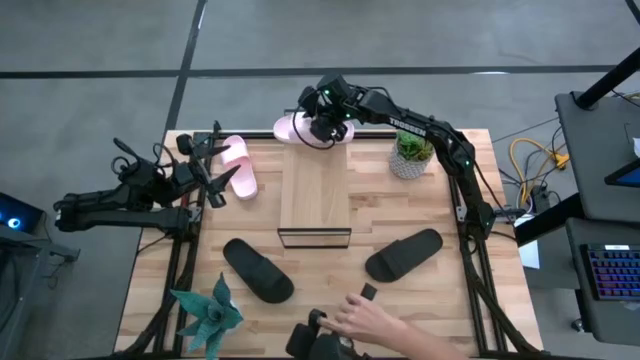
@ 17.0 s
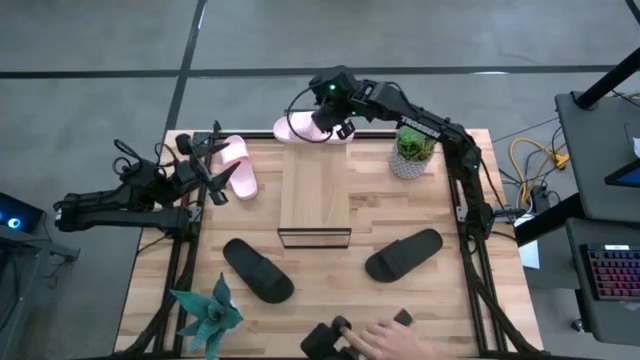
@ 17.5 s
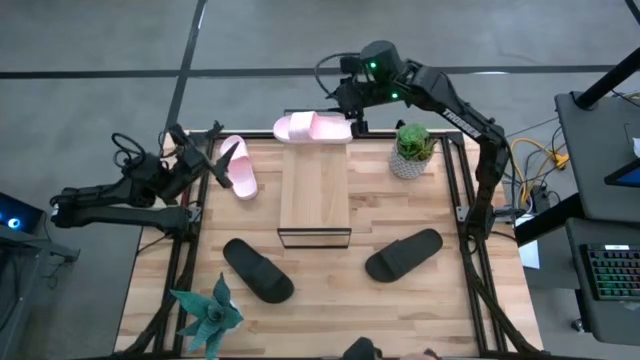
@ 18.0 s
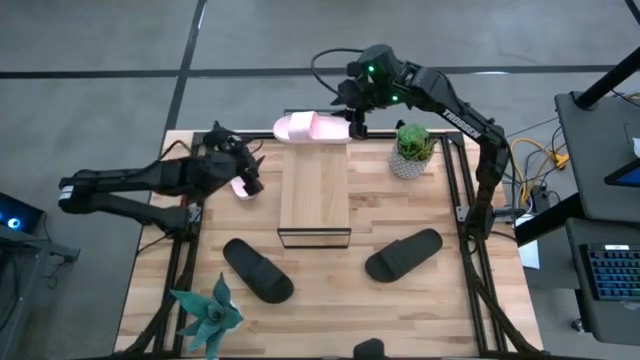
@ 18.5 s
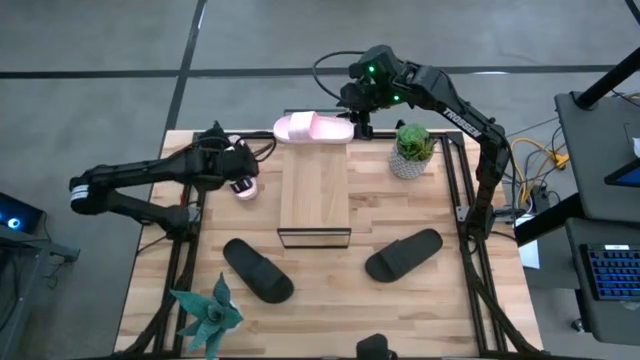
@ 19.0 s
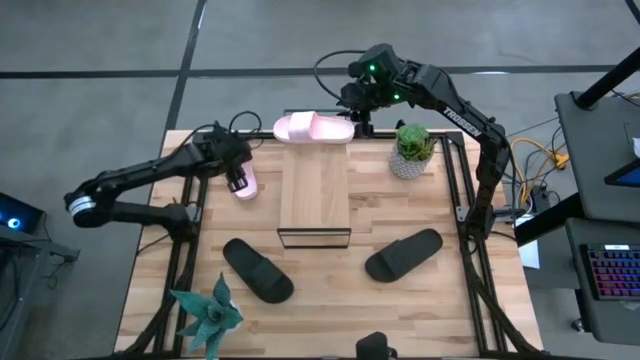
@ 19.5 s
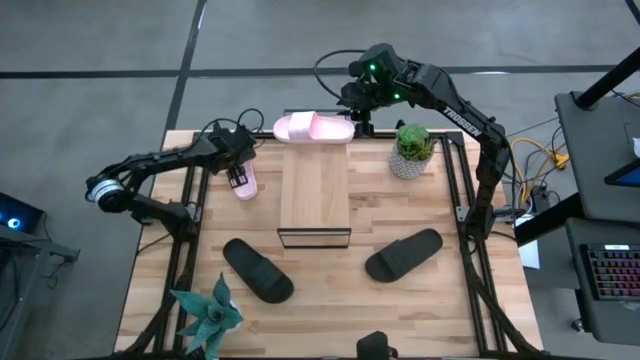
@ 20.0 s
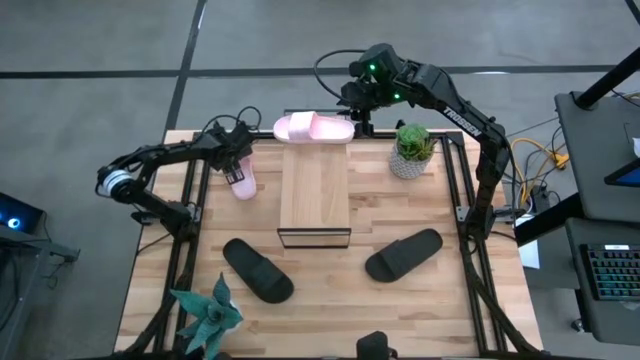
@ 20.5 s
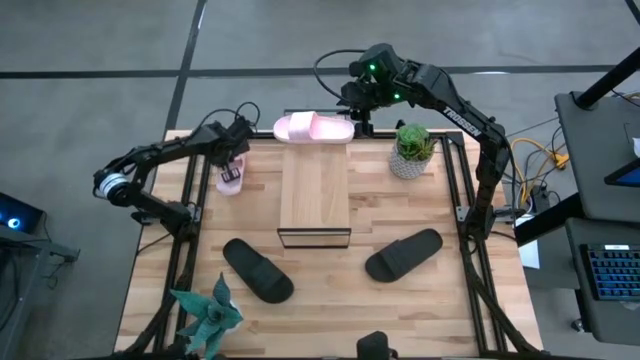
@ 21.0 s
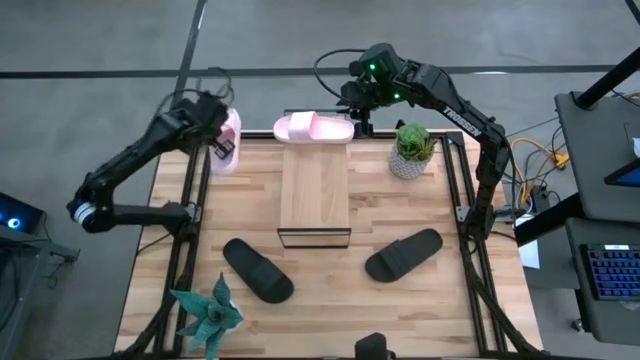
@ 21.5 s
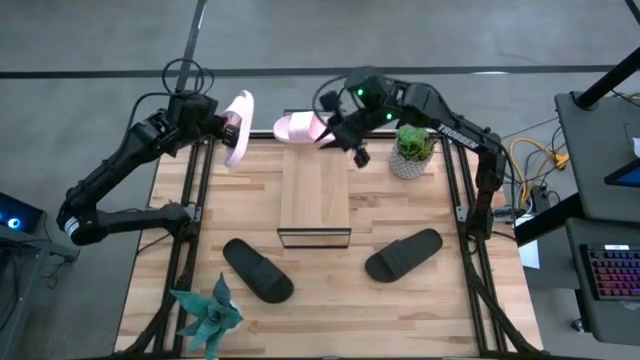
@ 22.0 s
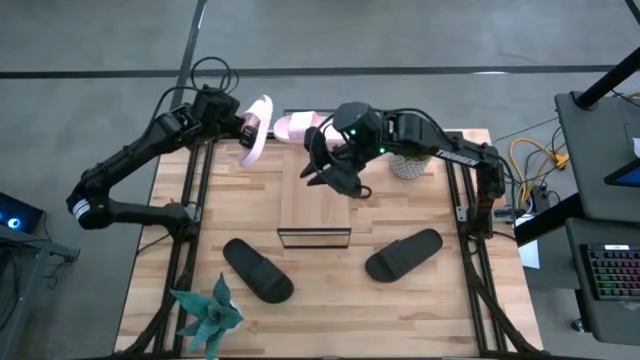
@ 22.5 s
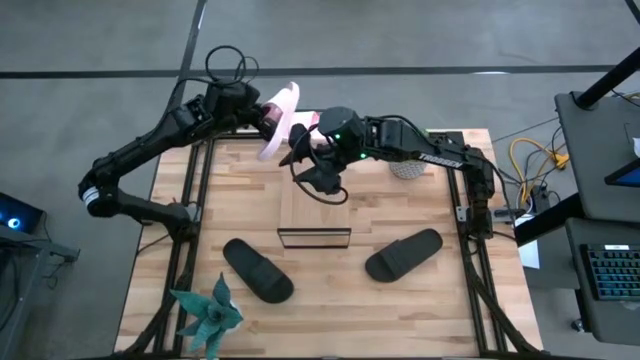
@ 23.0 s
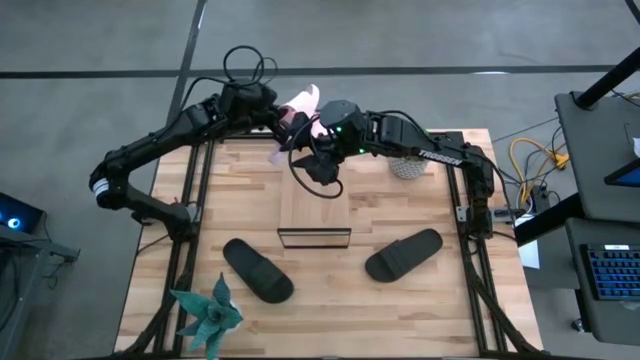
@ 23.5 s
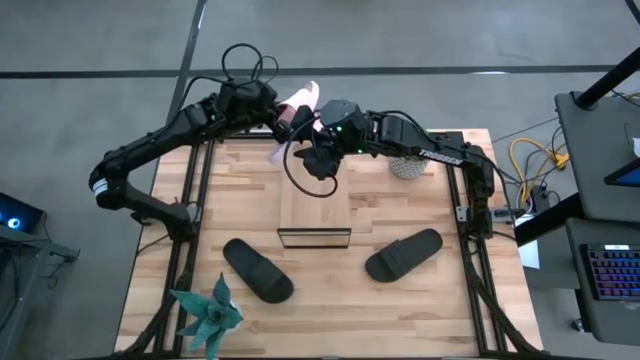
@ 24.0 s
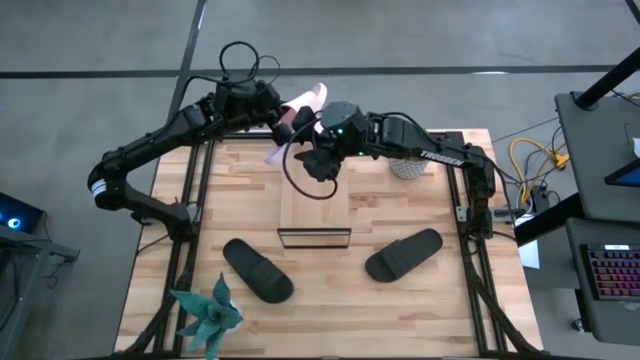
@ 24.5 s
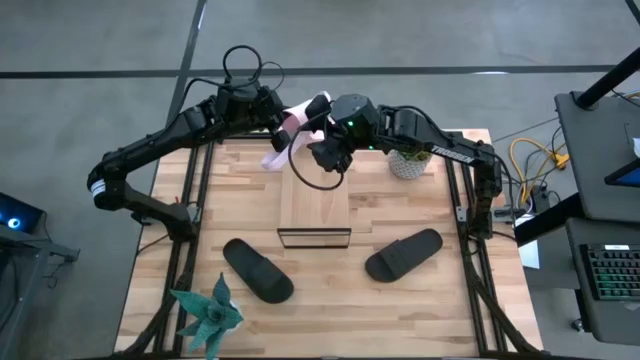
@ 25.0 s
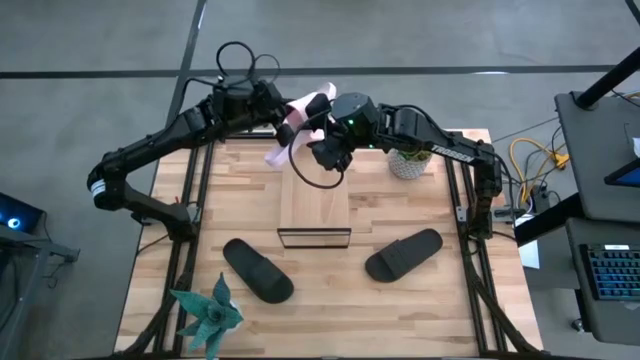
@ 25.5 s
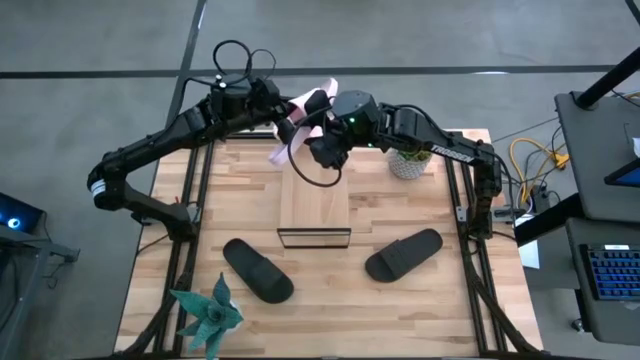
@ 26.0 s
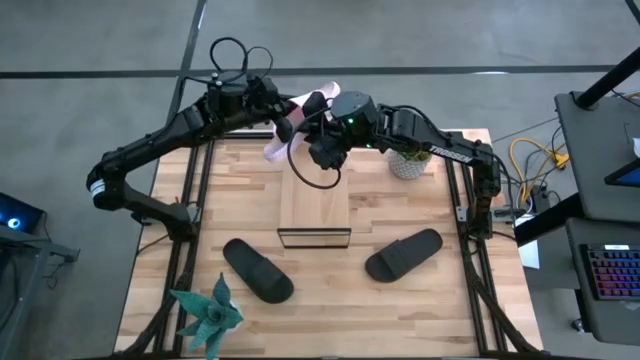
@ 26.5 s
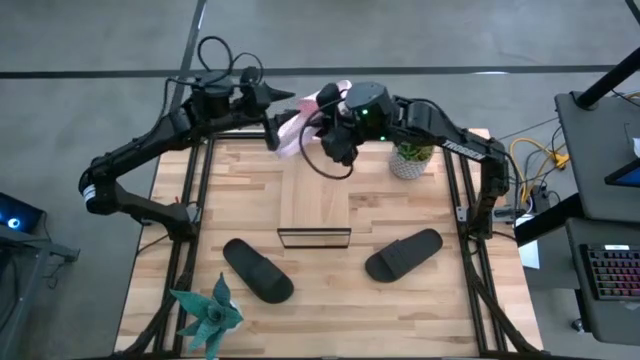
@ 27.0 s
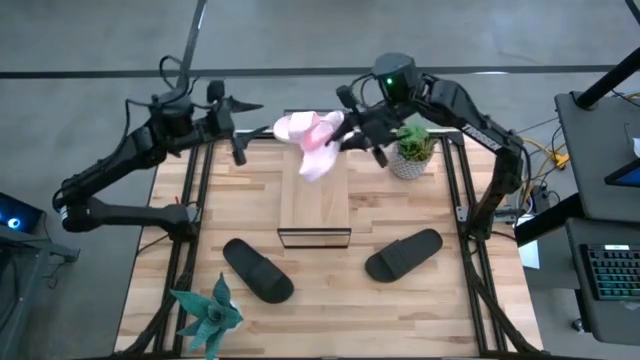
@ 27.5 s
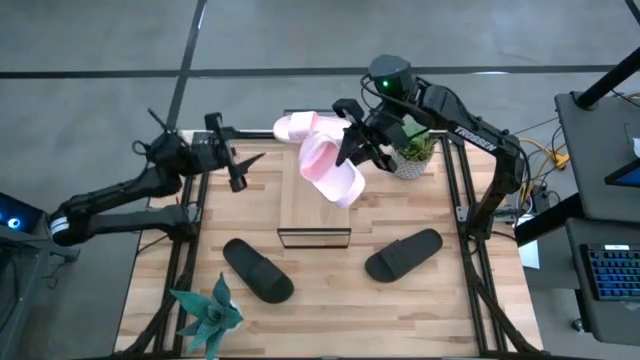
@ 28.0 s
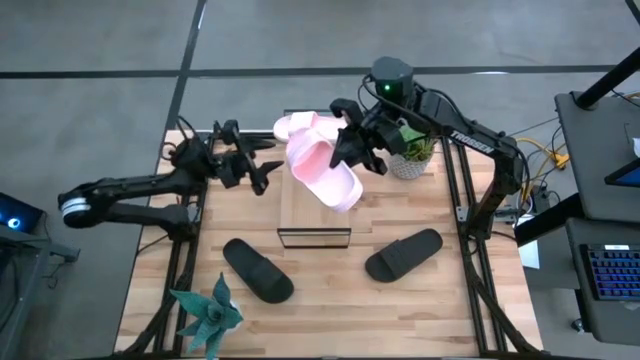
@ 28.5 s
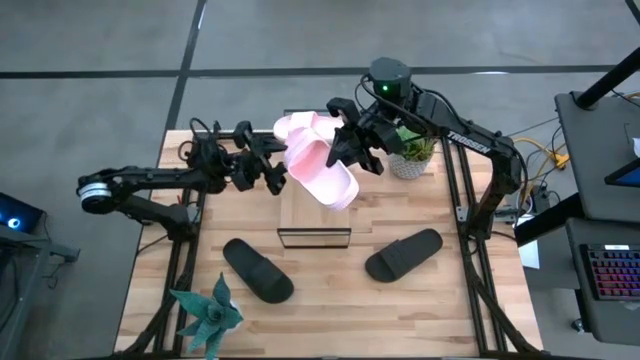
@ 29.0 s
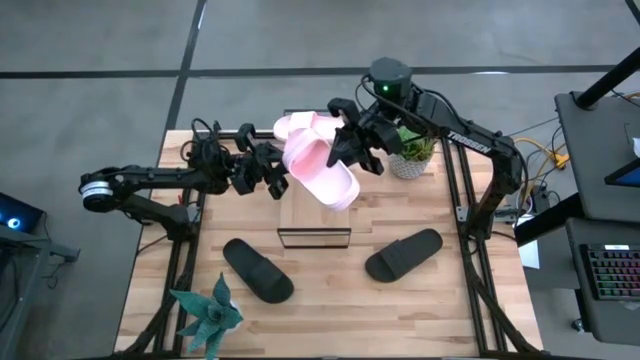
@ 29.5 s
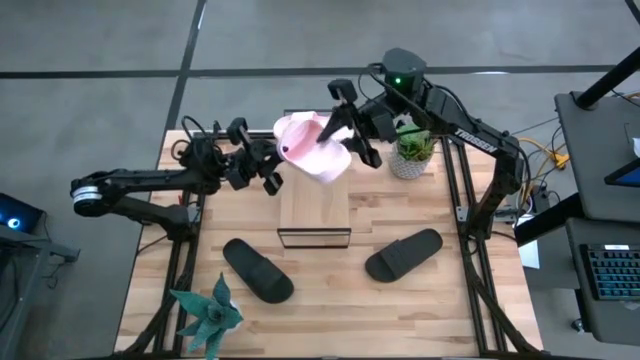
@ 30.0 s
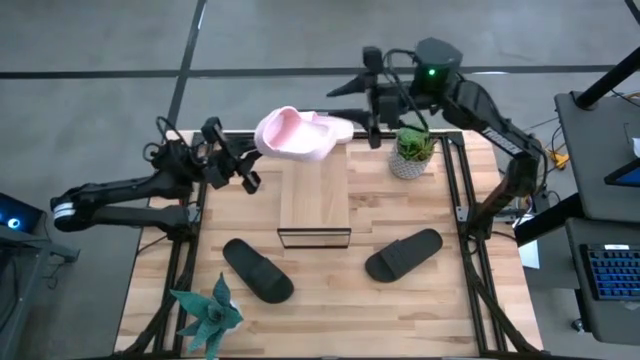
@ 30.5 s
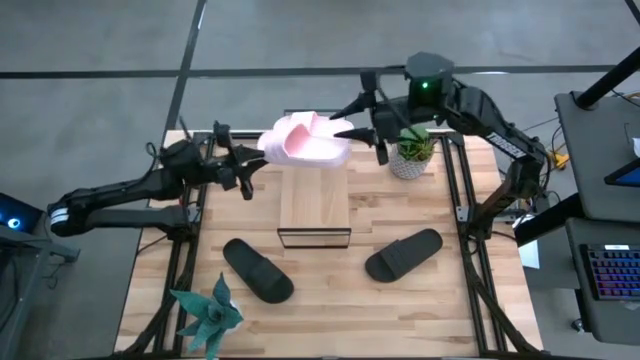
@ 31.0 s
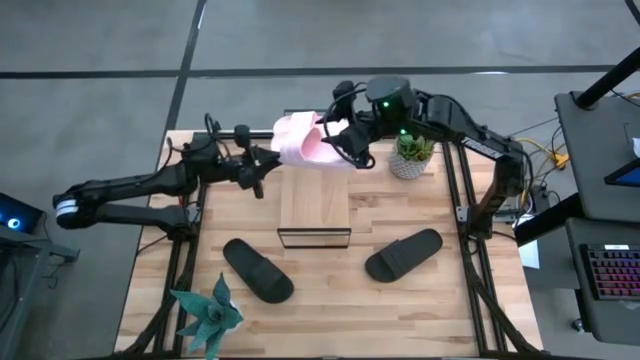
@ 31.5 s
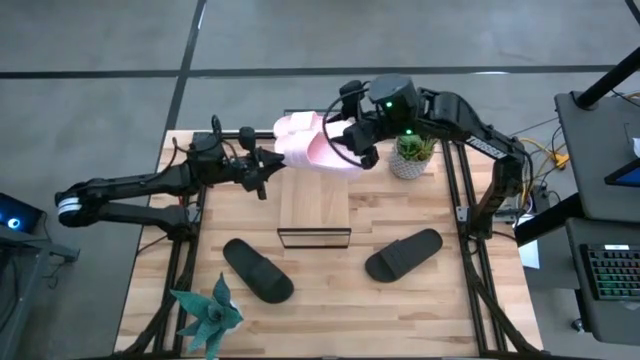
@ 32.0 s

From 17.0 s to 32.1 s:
Task: Pick and place slides into the shelf
Put the pink slide on the shelf

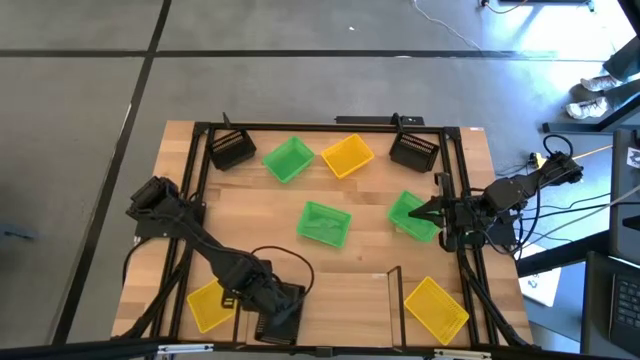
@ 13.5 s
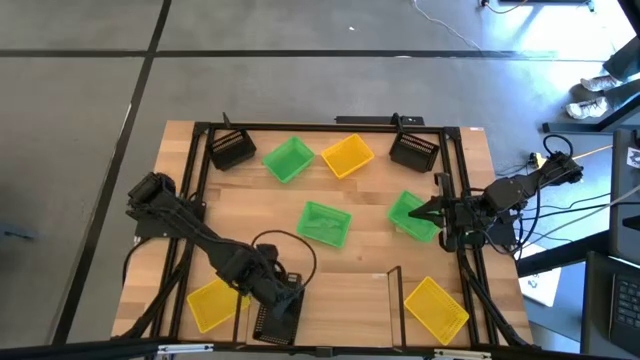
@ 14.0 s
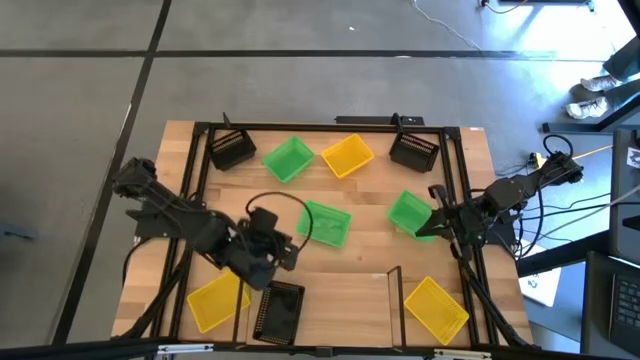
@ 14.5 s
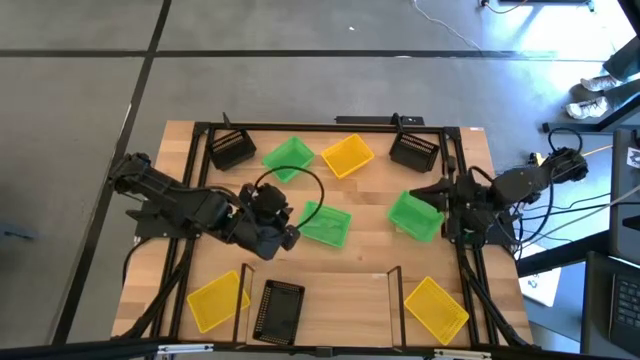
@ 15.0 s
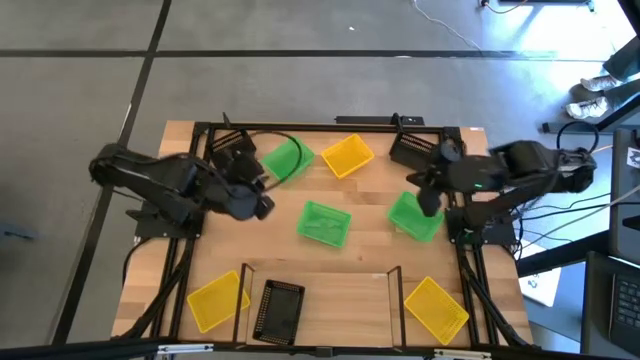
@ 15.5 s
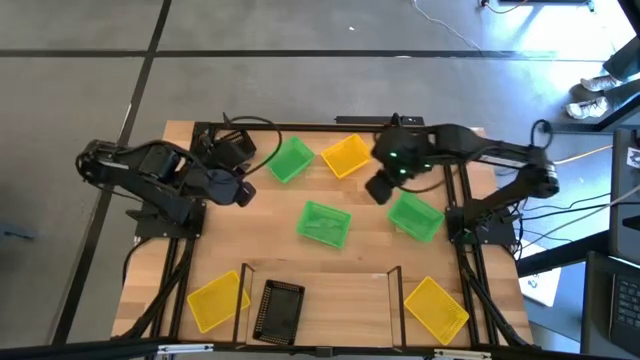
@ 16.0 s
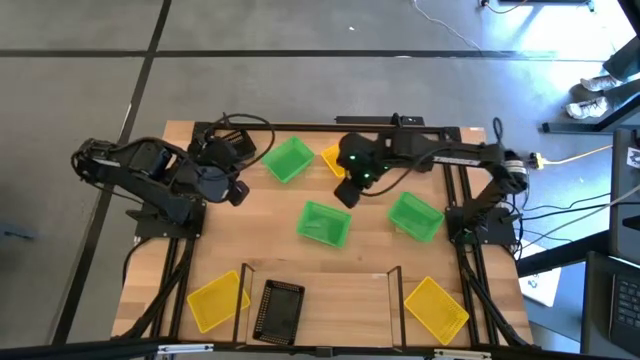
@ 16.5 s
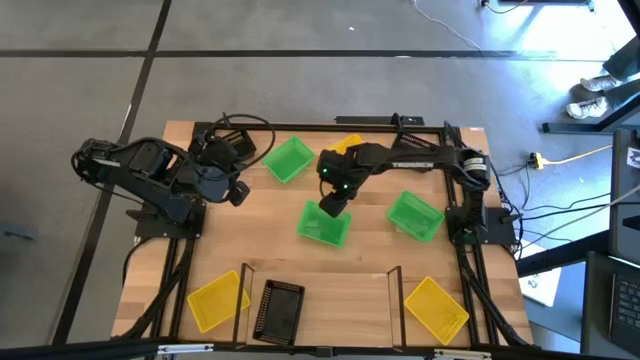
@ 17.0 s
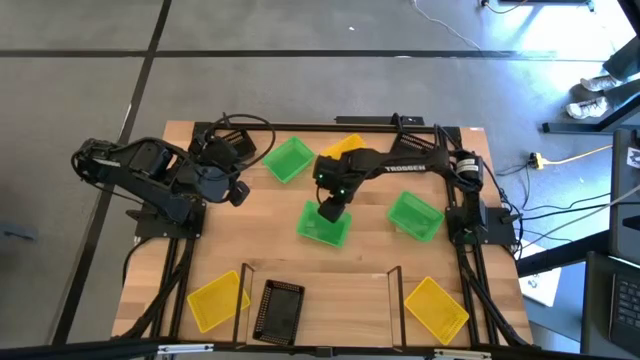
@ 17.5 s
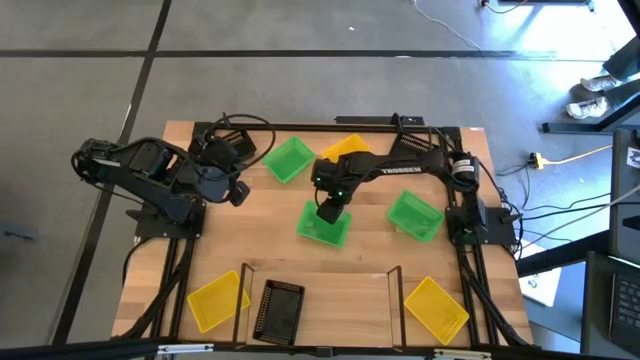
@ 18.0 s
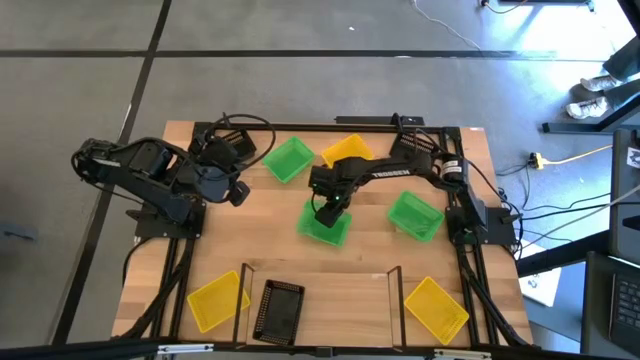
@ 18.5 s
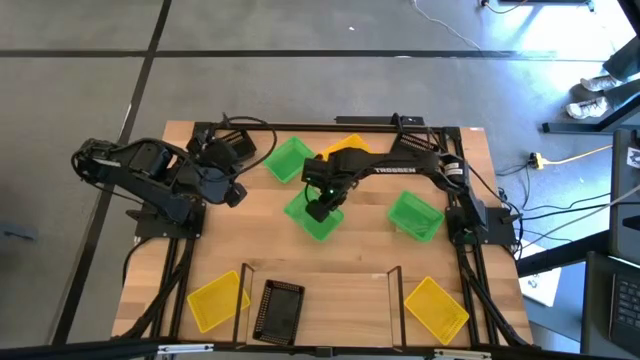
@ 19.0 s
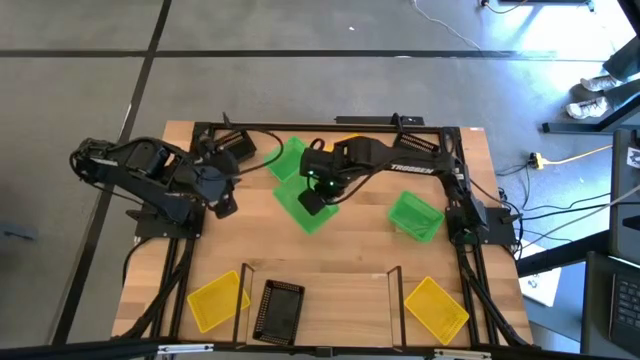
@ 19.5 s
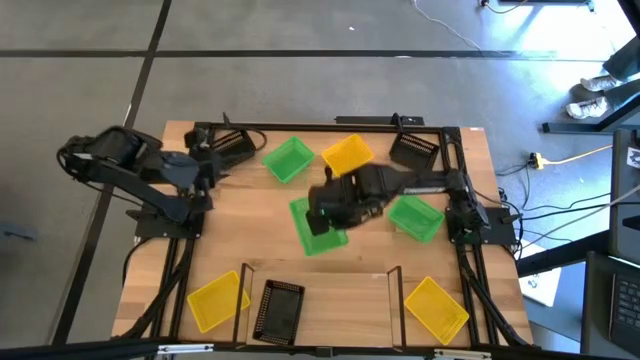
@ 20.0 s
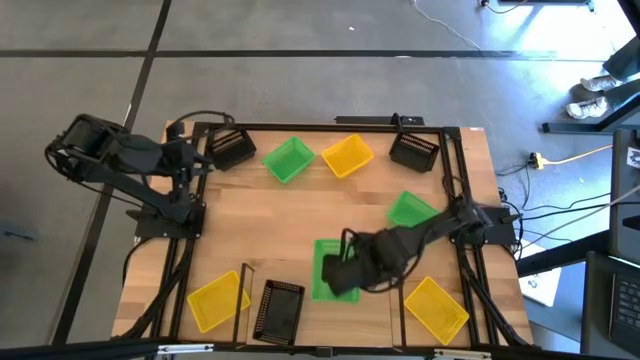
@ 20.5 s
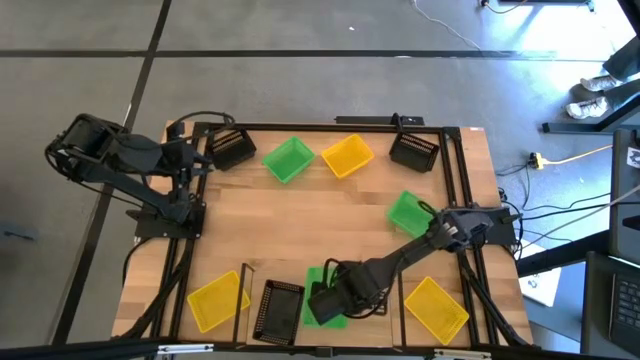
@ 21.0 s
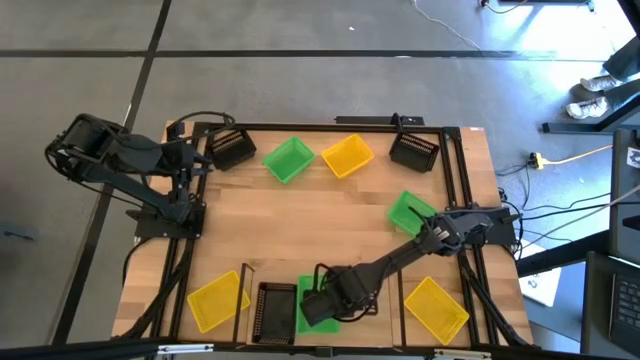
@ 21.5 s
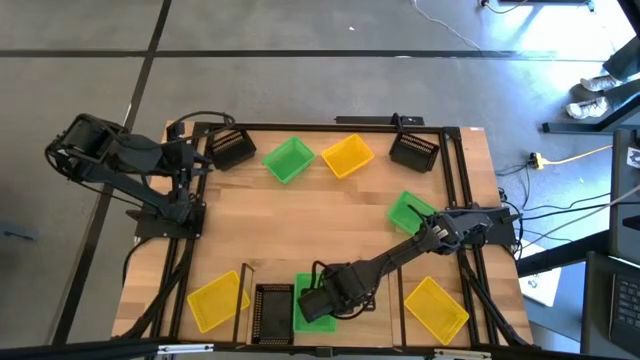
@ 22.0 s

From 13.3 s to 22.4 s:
Task: Stack baskets on shelf by color
Put the bottom left green basket on the shelf
